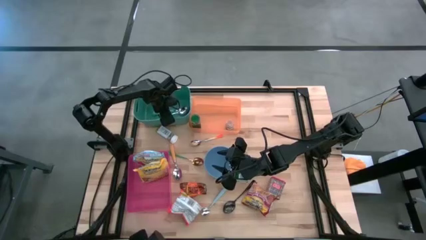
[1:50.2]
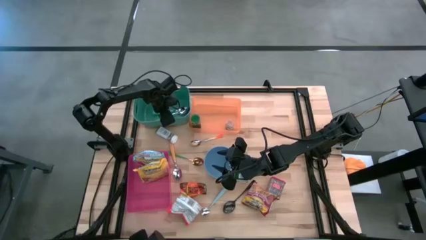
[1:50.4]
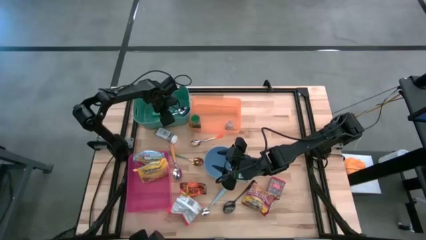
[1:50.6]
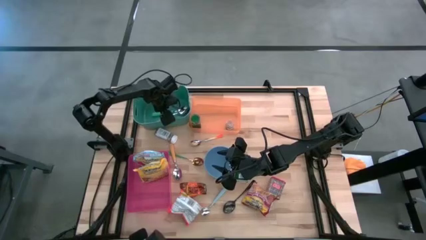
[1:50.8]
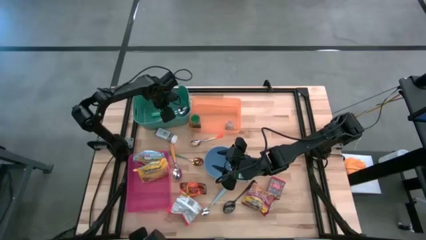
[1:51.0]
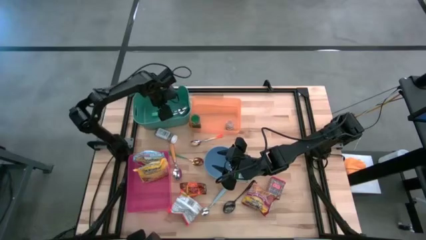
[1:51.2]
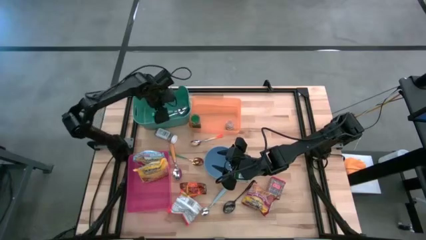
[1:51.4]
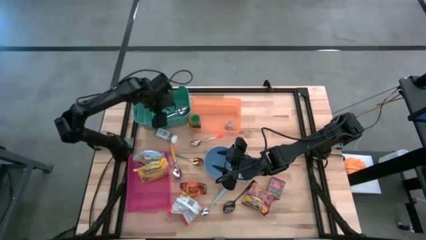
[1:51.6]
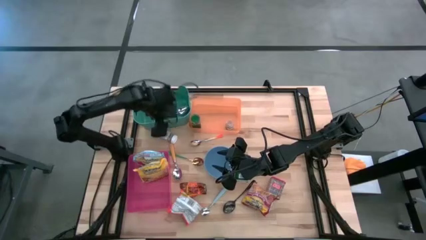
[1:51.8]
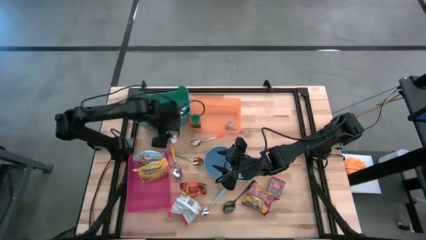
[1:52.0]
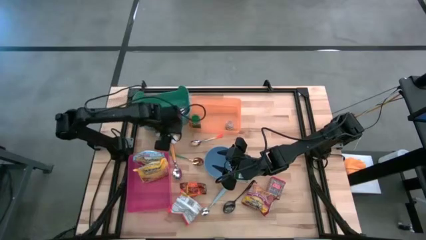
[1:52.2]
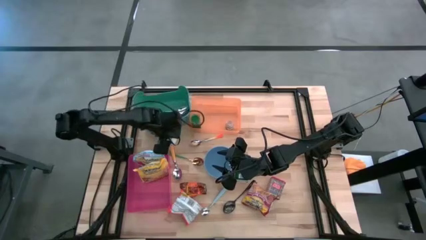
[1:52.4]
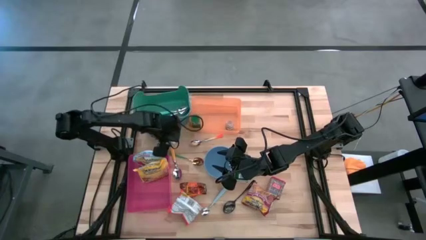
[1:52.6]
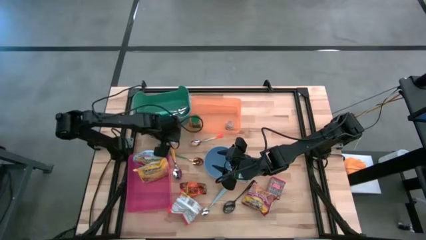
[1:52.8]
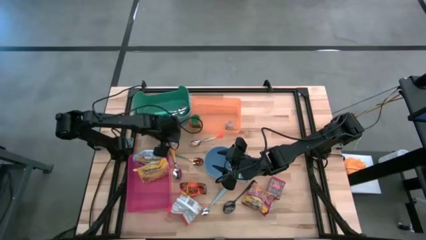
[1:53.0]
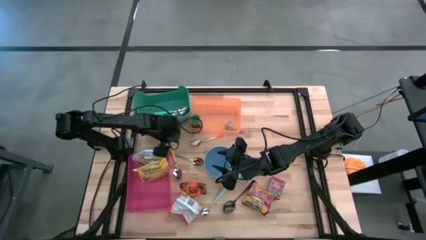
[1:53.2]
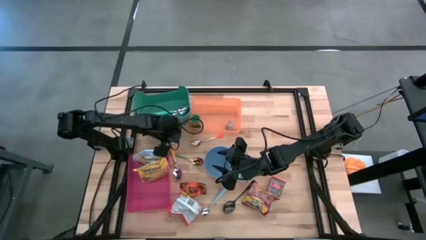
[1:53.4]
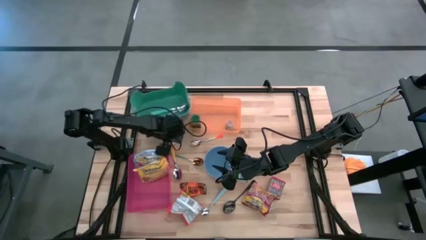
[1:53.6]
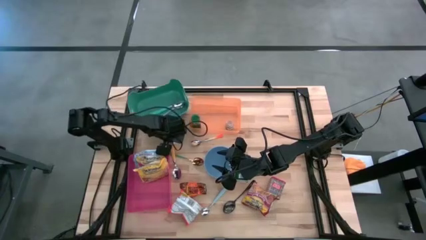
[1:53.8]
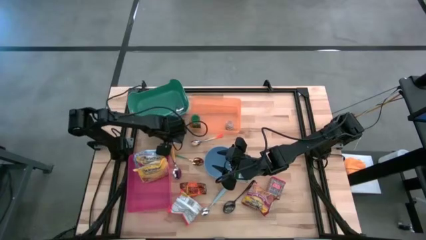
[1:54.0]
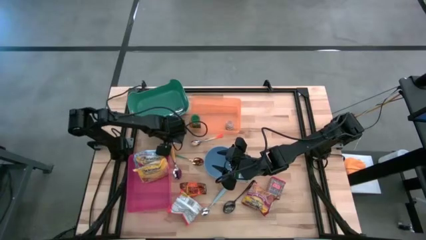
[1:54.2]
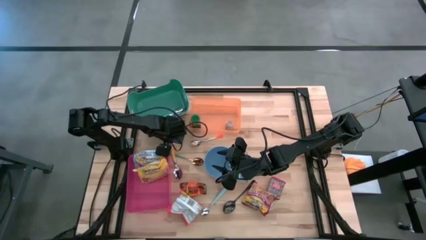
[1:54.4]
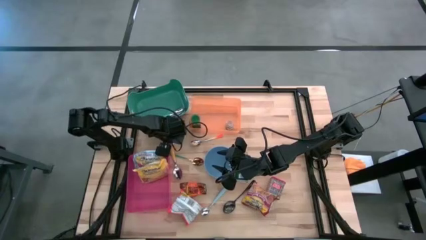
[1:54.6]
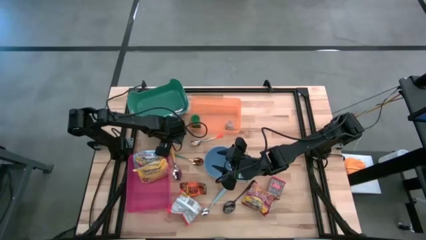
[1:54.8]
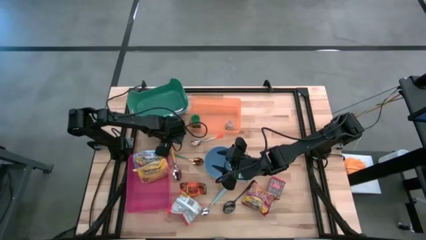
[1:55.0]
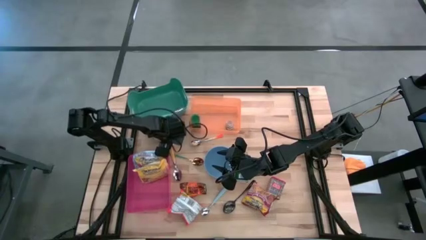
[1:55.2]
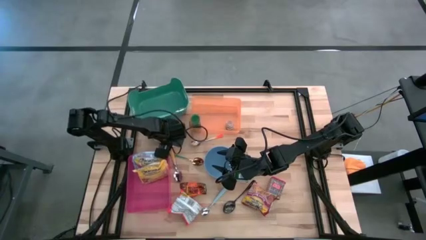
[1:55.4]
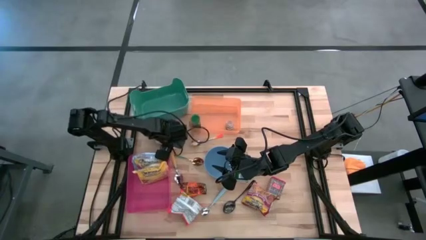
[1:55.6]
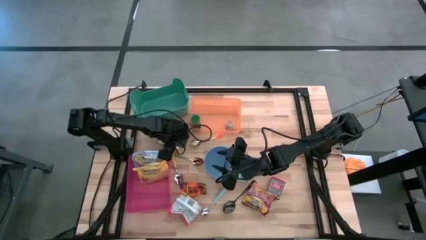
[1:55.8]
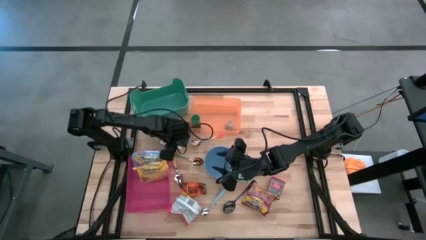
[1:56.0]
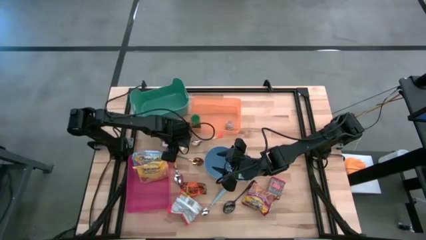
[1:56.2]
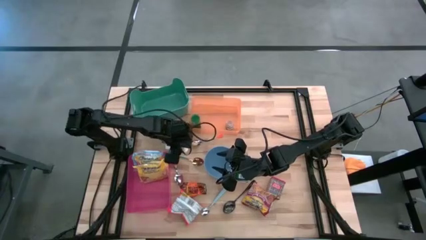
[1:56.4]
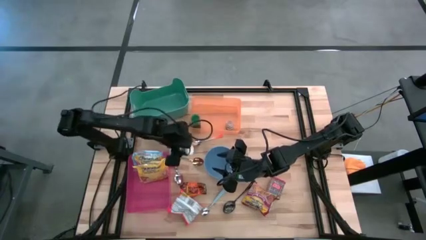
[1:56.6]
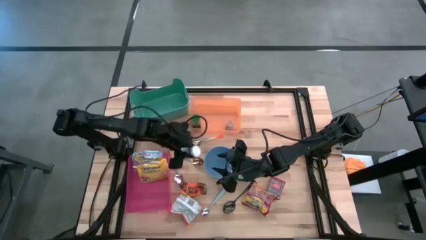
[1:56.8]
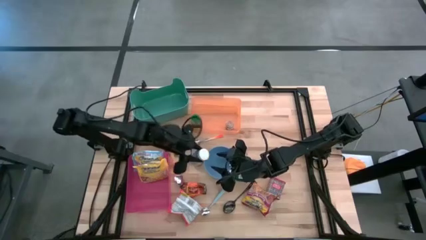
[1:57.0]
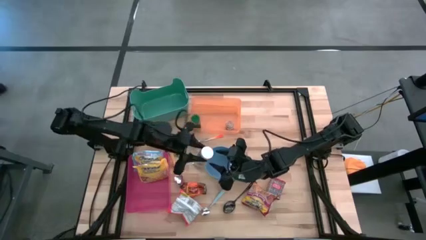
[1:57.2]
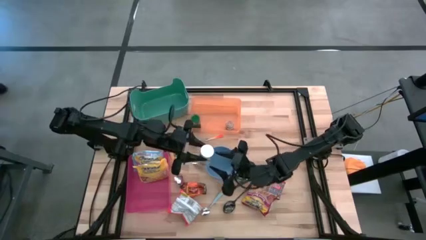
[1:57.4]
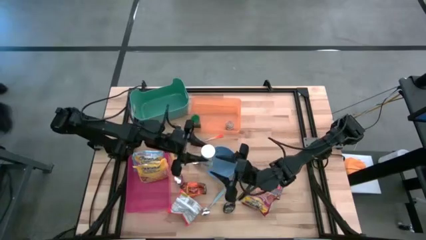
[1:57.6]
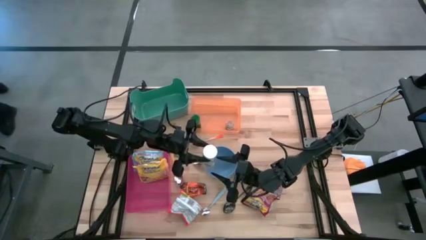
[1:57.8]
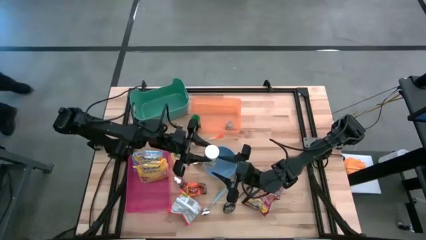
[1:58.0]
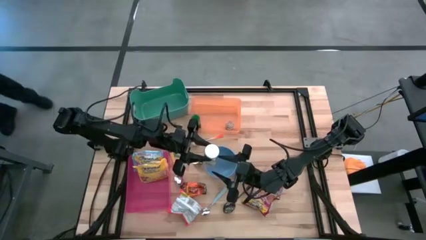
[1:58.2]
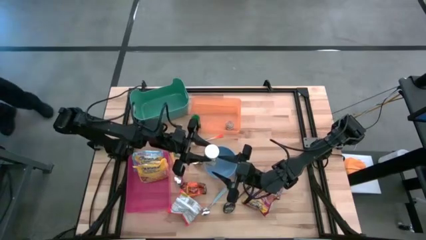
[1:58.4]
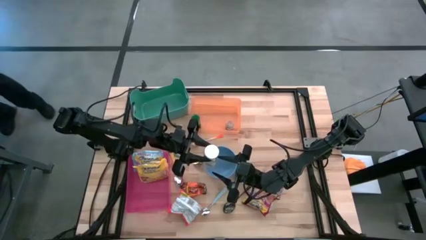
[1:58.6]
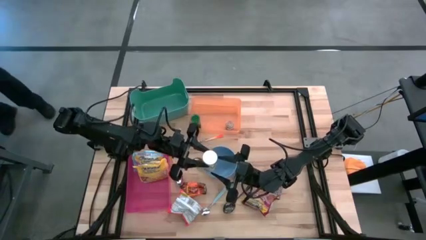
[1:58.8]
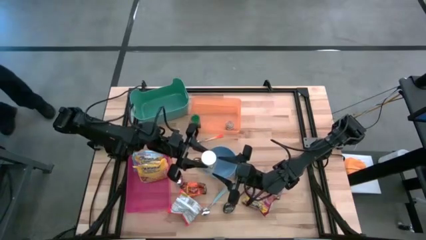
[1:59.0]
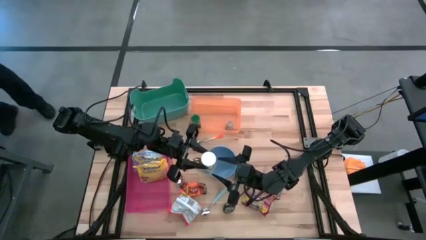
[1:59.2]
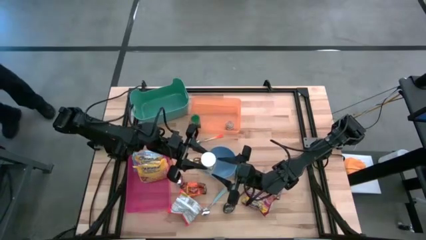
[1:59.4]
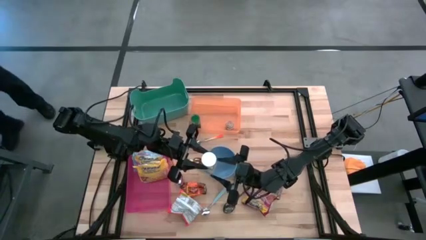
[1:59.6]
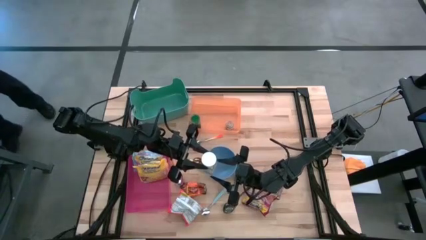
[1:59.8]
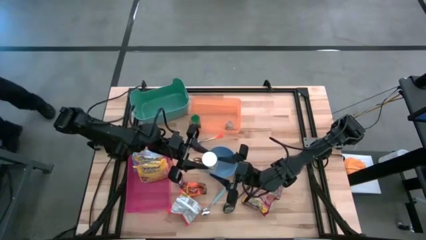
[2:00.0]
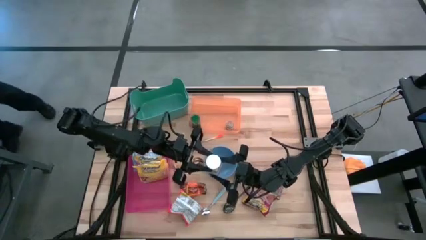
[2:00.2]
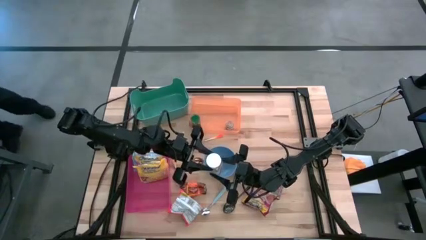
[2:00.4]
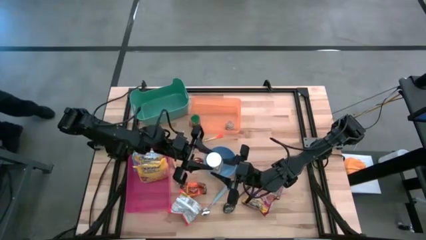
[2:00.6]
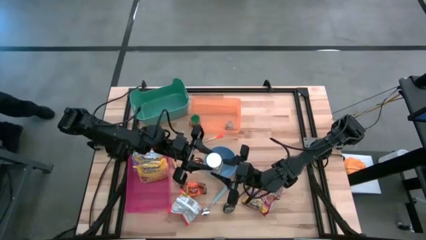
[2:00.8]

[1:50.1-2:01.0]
Put the white spice bottle into the orange bin
